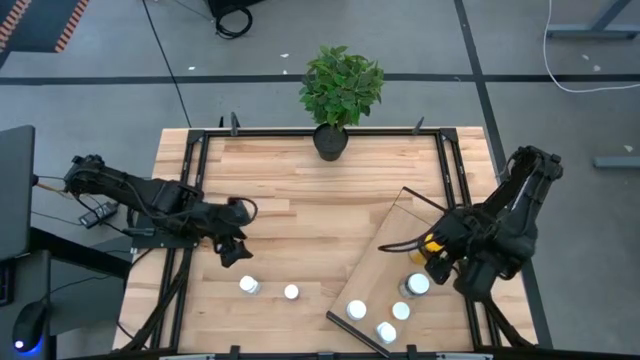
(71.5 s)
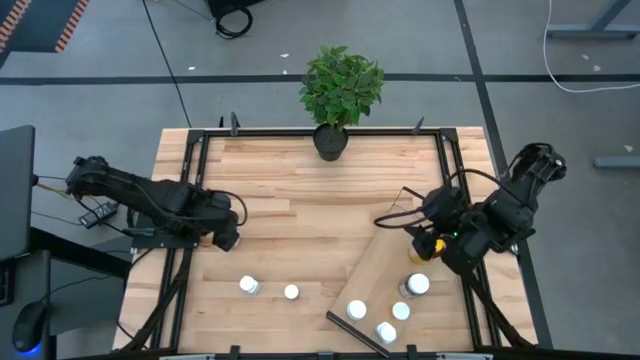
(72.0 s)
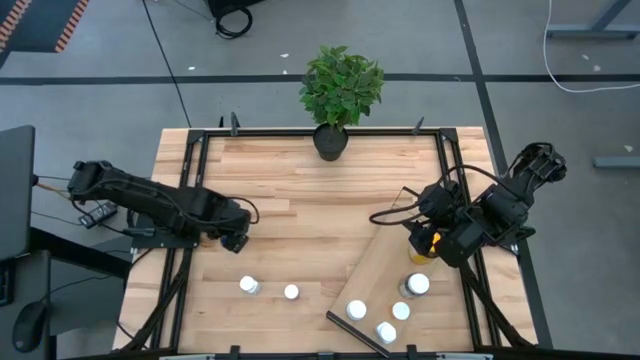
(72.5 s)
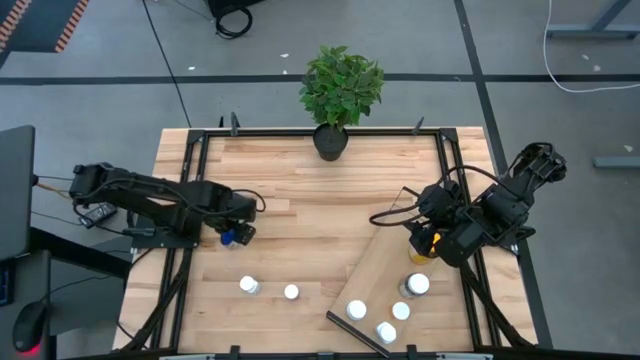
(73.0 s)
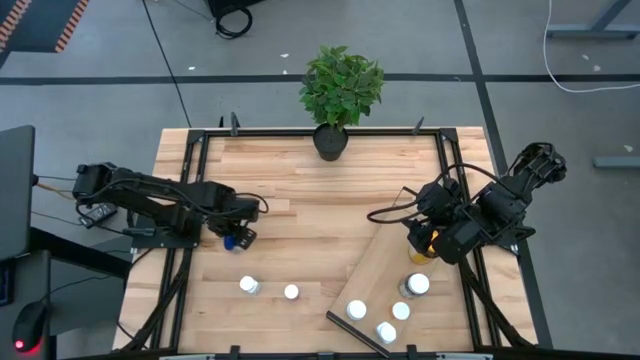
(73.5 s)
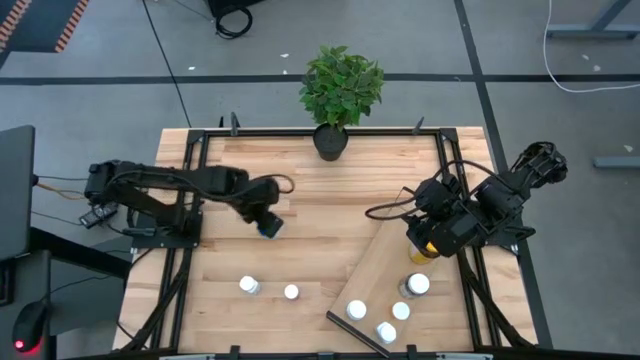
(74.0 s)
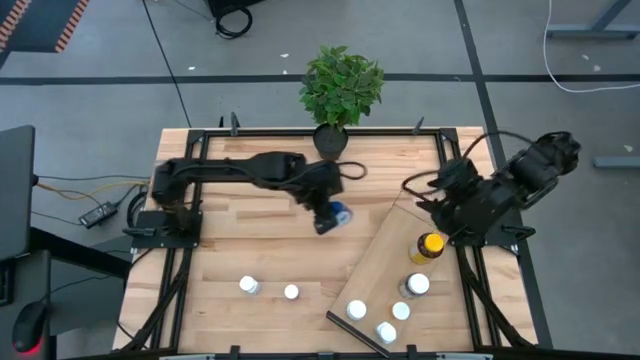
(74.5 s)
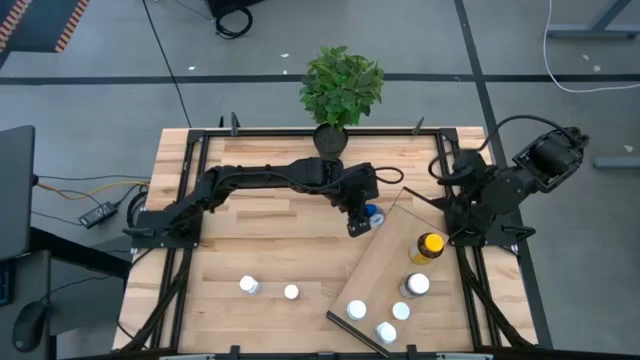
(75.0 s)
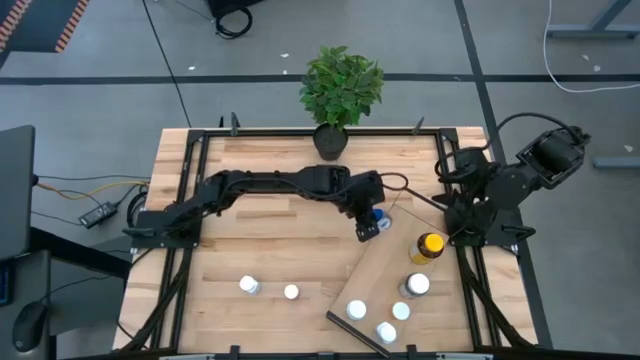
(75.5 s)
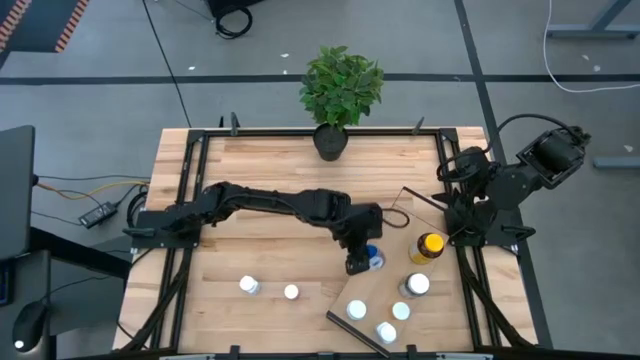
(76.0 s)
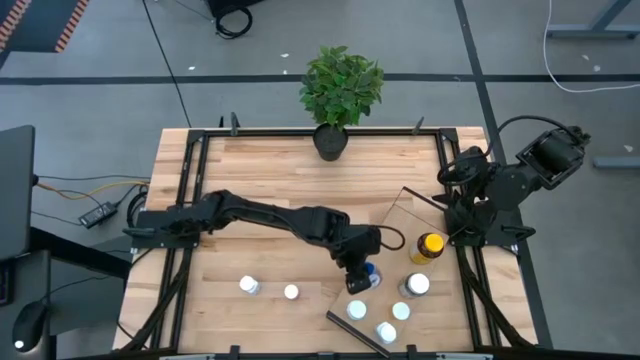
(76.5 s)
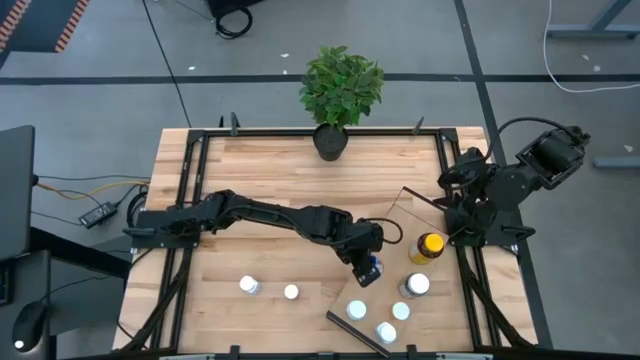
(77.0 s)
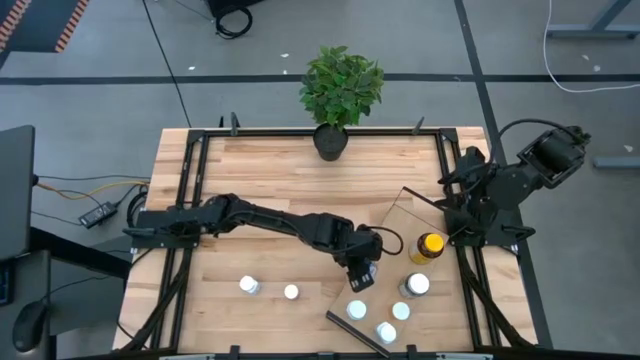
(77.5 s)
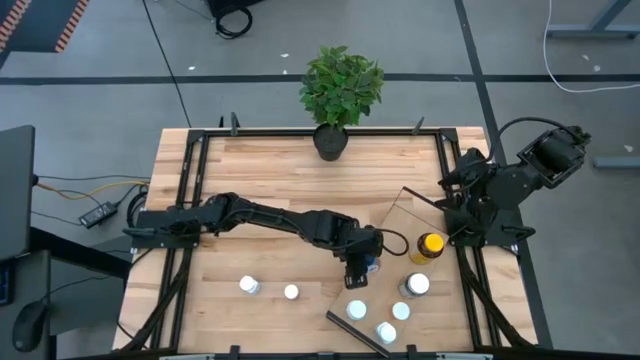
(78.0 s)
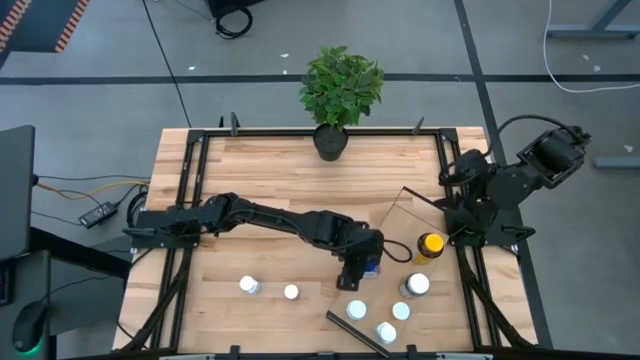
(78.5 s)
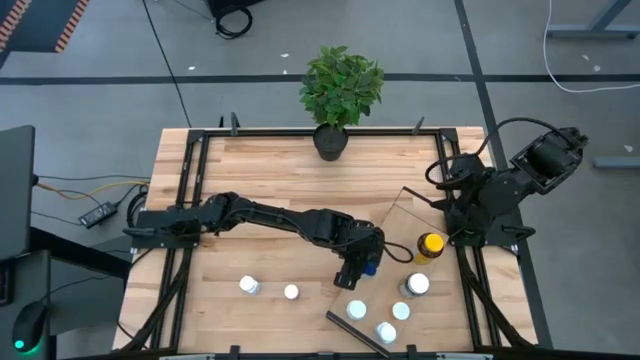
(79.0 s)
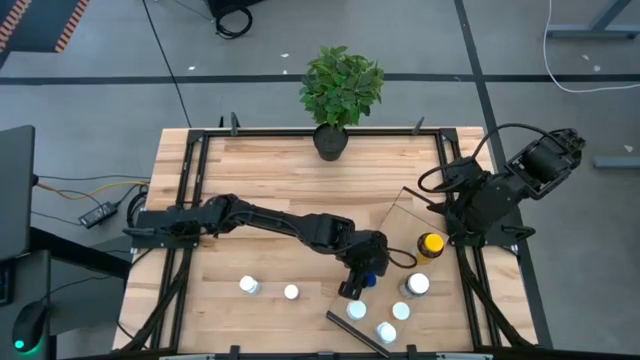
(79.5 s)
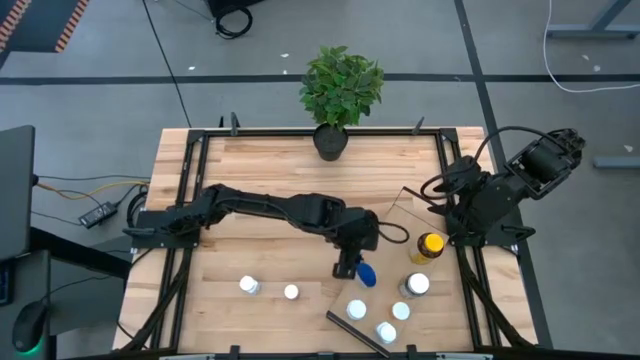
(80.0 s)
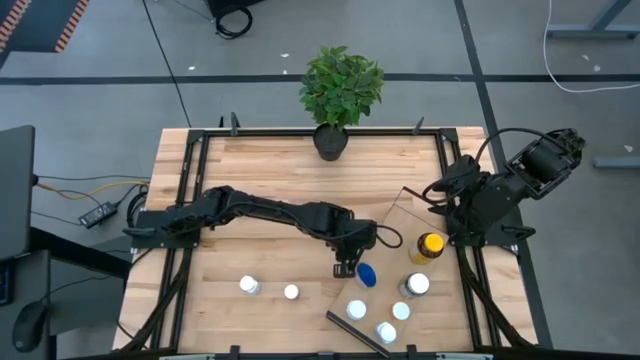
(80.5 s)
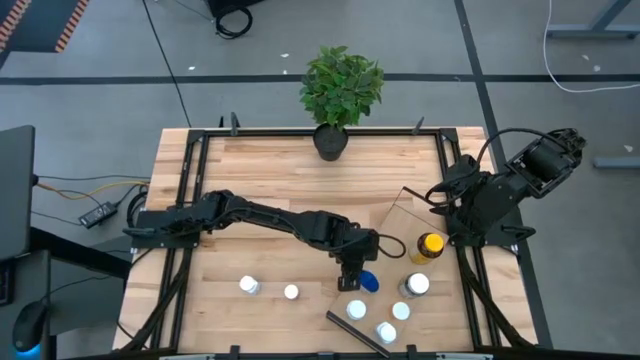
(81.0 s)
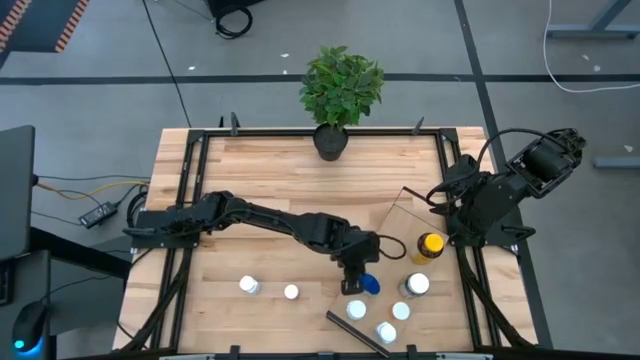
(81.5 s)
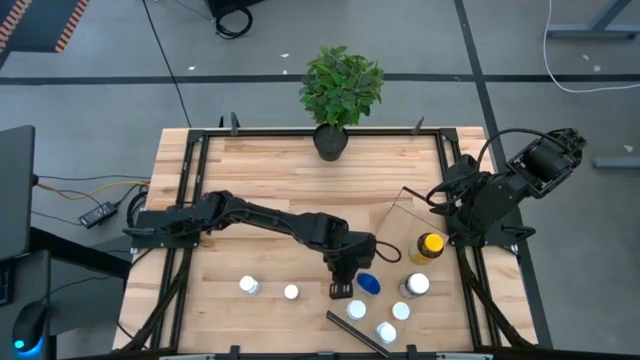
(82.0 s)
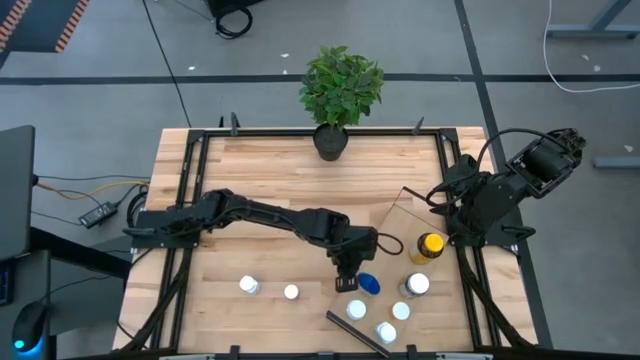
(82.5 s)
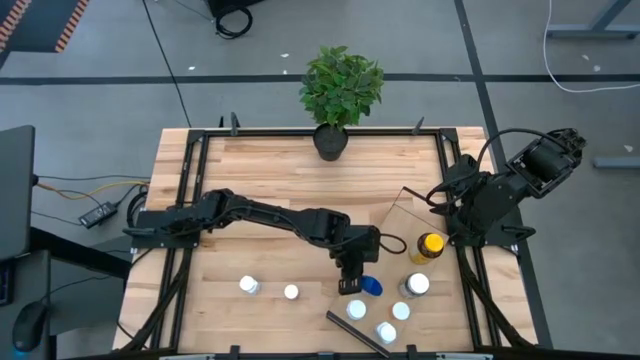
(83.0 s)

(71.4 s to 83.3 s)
Task: Pick and place medicine bottles onto shelf by color
Put the blue medicine bottle on the shelf

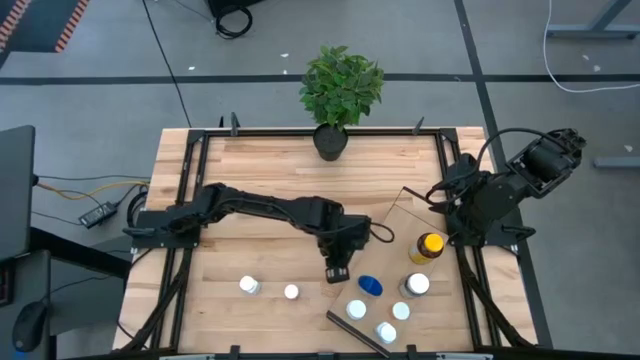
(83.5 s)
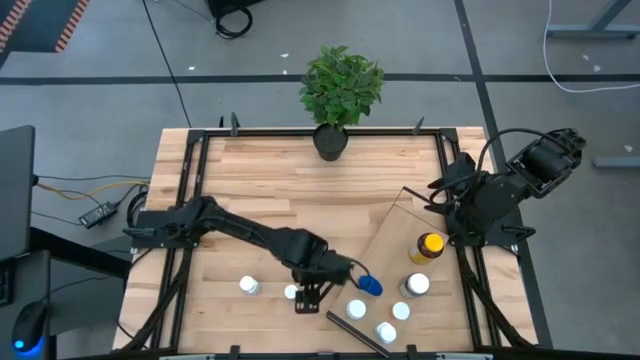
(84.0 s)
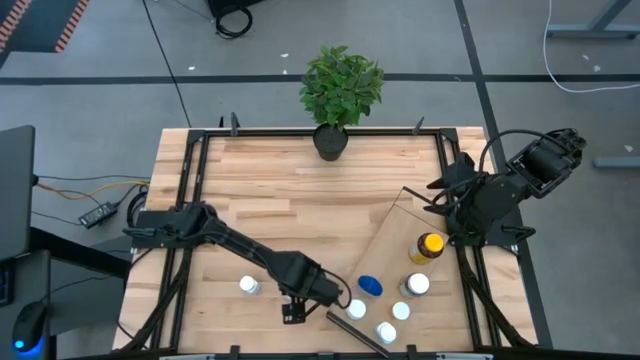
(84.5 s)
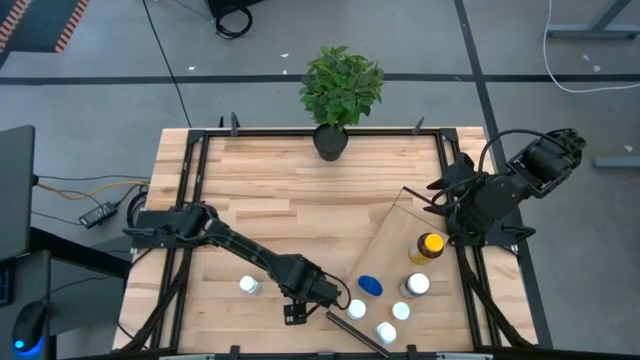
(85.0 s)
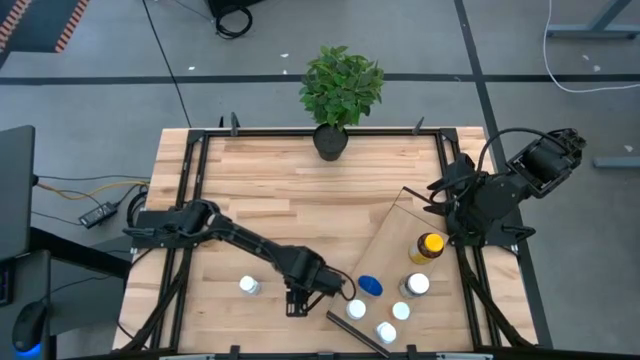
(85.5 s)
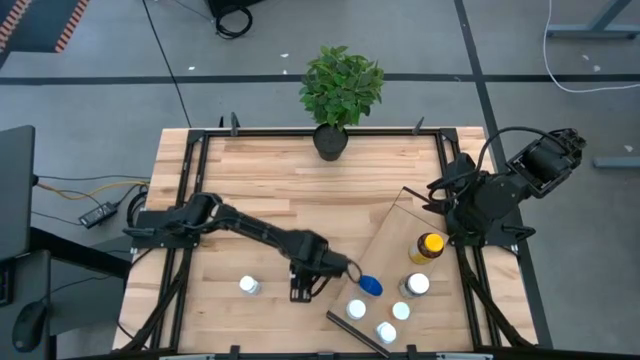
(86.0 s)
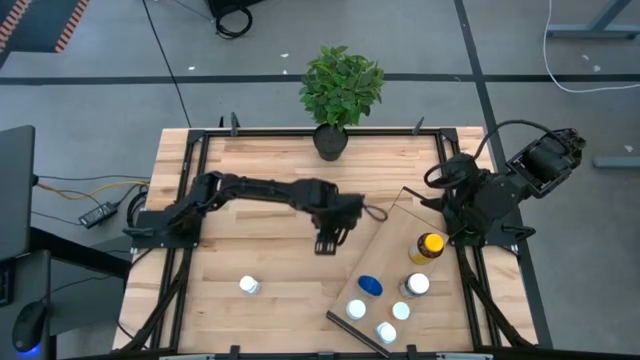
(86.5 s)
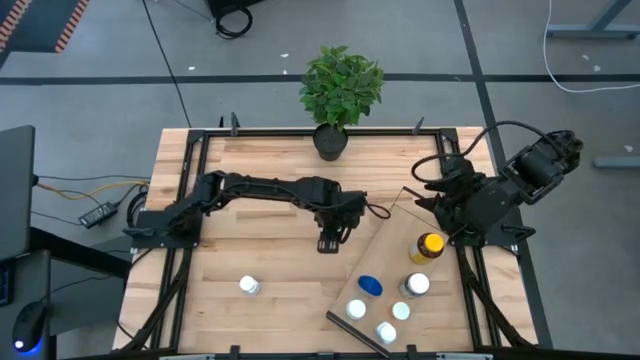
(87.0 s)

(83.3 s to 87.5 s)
Put the pink medicine bottle on the shelf

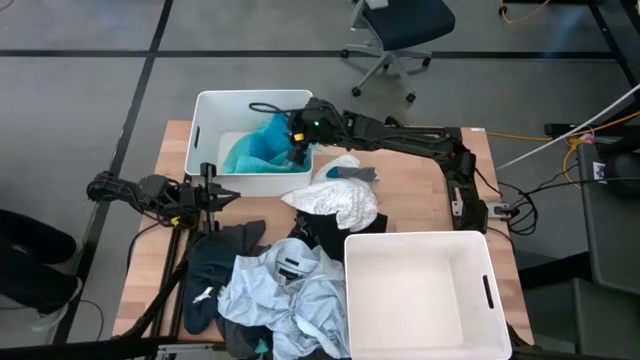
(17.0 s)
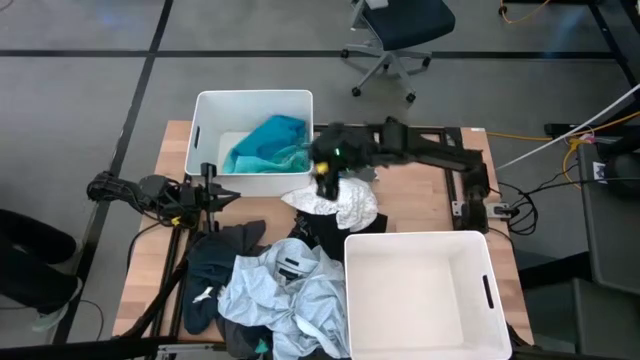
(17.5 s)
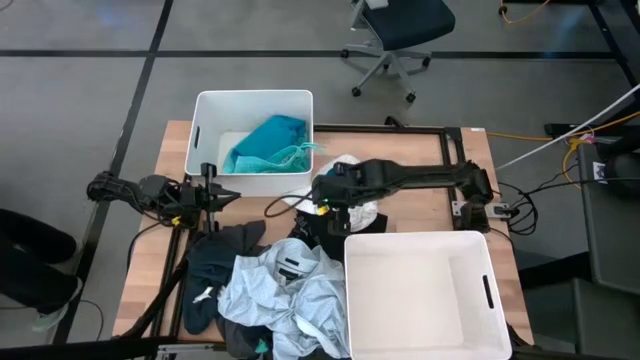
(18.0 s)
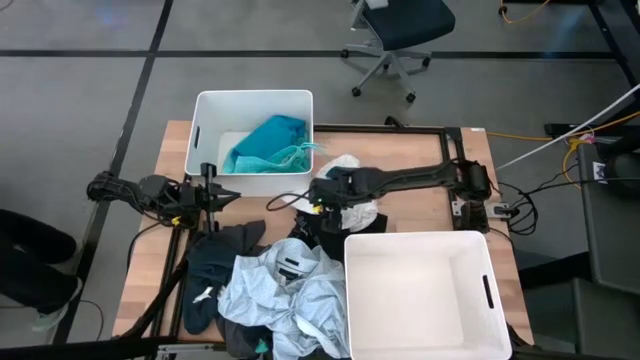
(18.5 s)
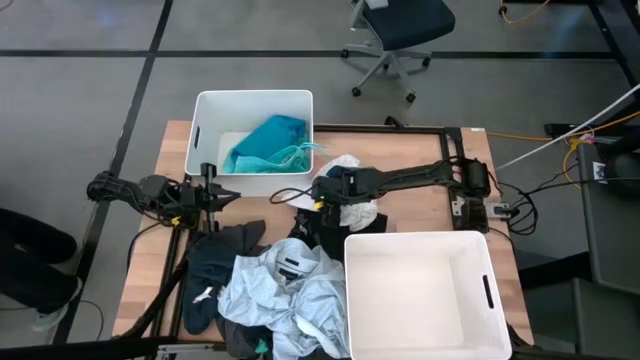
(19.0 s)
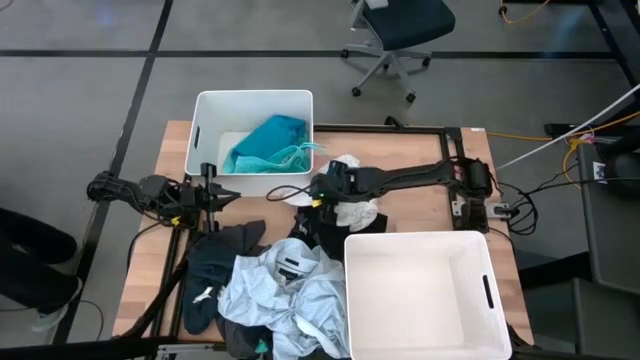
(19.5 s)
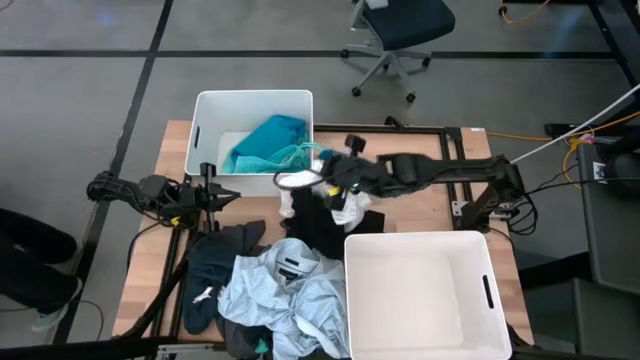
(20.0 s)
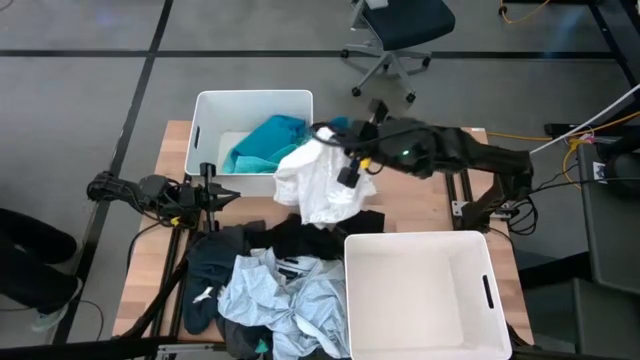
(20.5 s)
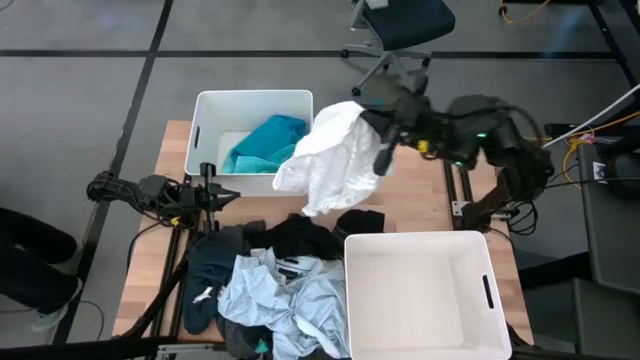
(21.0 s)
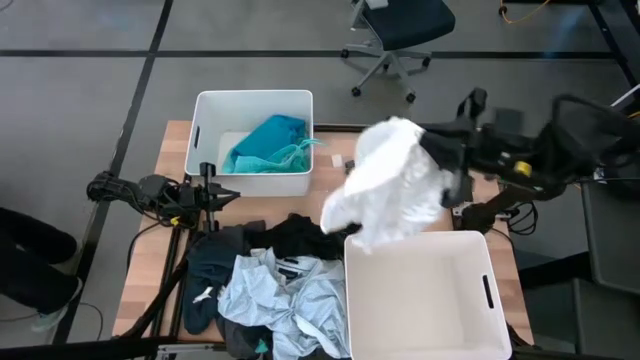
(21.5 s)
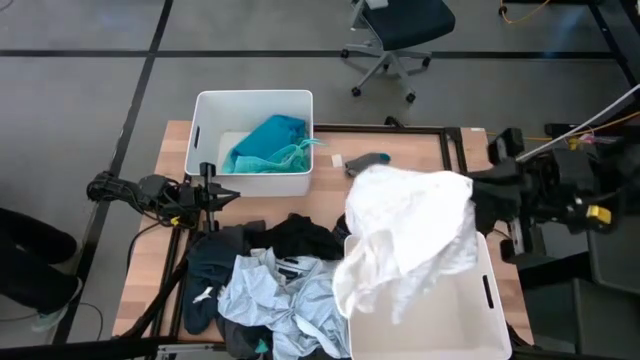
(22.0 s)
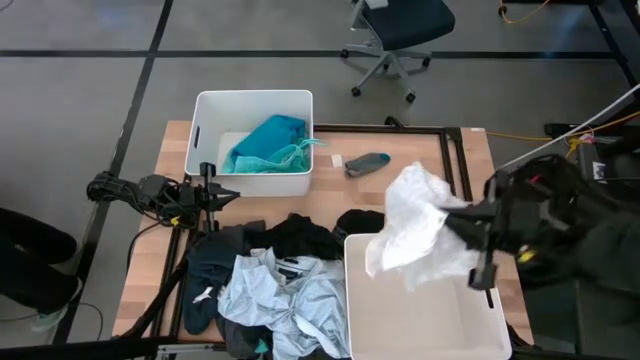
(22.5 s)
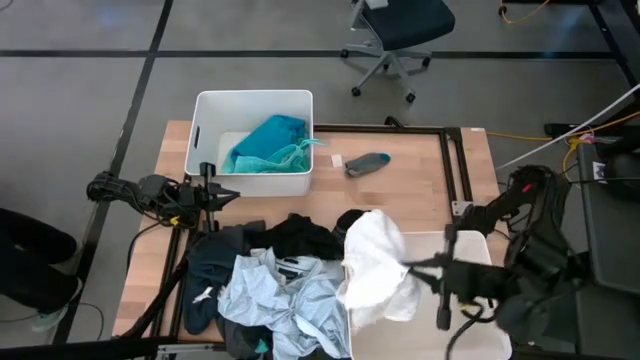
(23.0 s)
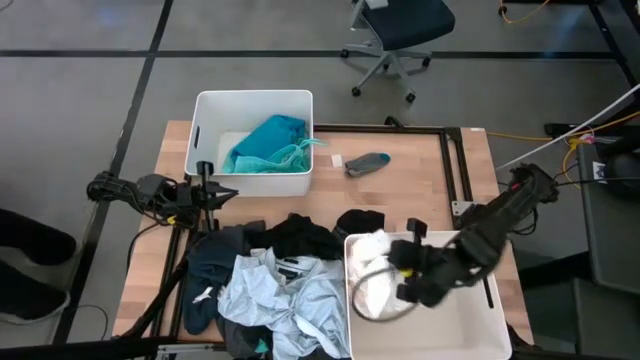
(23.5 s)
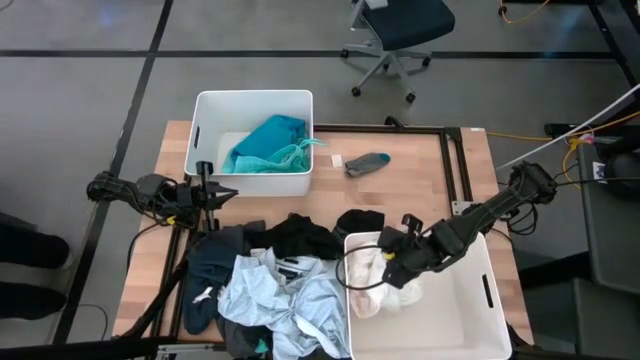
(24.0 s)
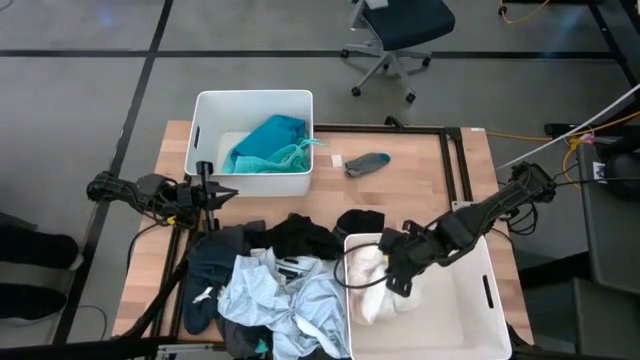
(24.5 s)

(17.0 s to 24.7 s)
Task: Sort clothes
Put the white dress into the bottom white laundry bin
